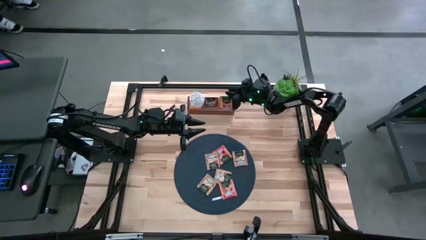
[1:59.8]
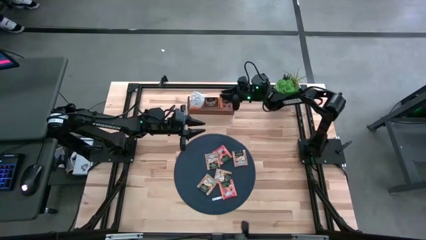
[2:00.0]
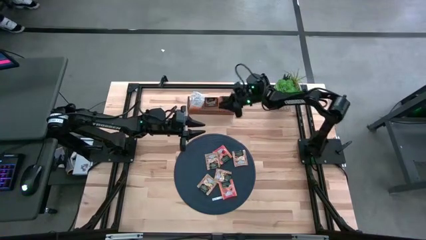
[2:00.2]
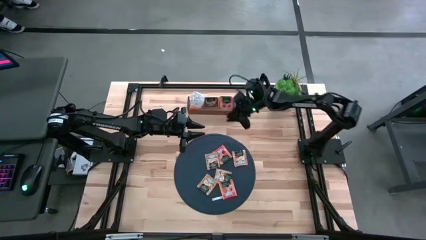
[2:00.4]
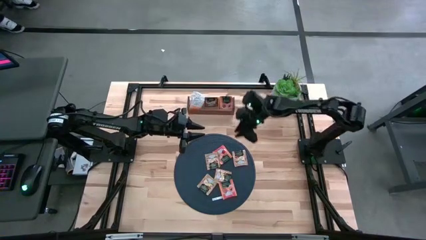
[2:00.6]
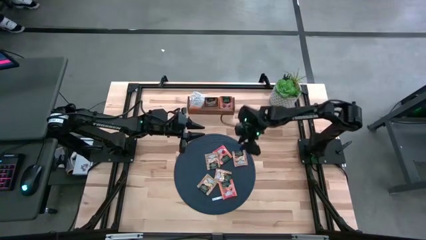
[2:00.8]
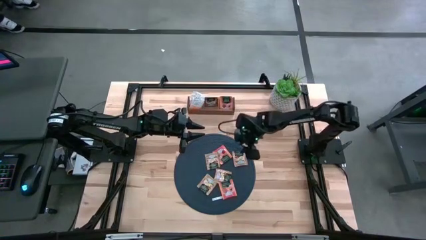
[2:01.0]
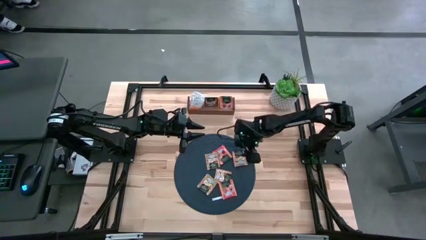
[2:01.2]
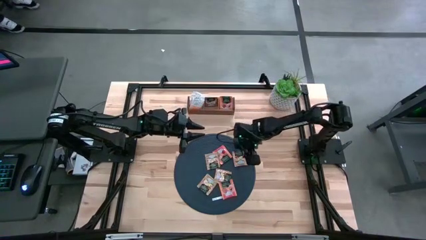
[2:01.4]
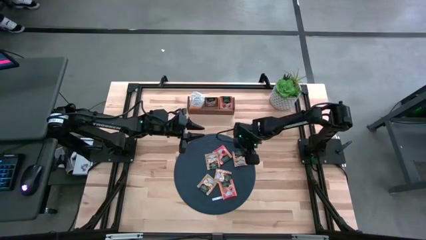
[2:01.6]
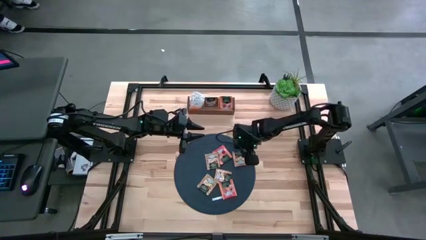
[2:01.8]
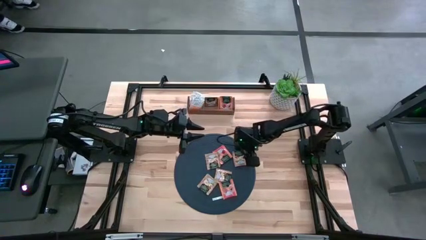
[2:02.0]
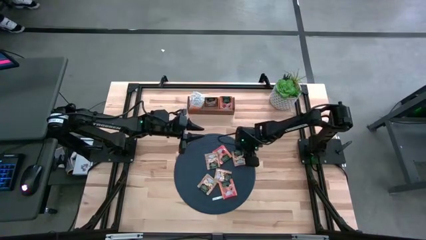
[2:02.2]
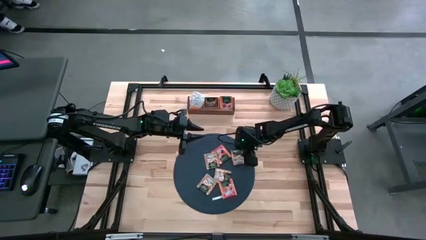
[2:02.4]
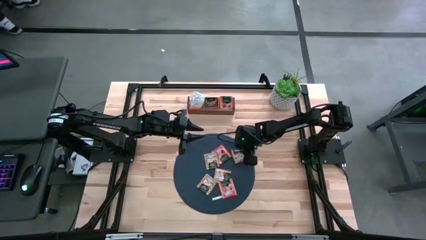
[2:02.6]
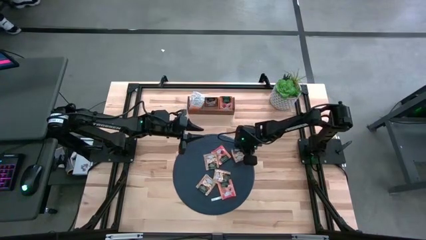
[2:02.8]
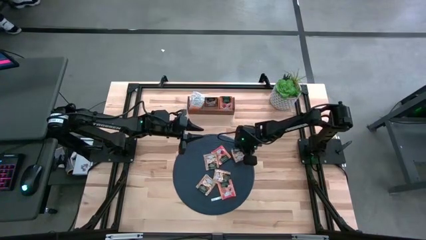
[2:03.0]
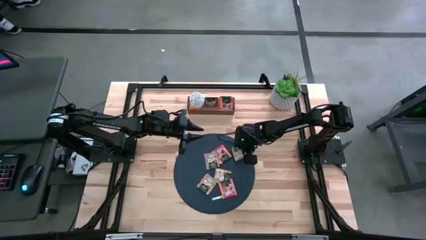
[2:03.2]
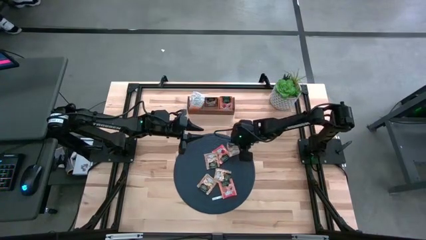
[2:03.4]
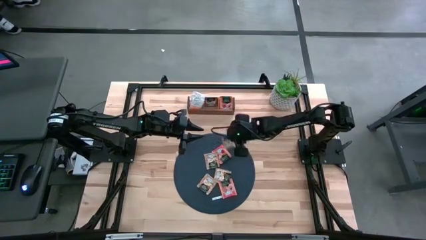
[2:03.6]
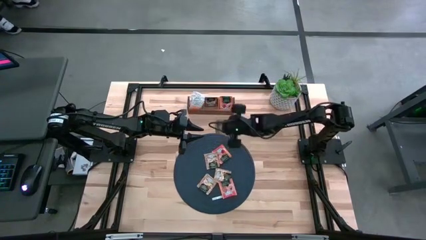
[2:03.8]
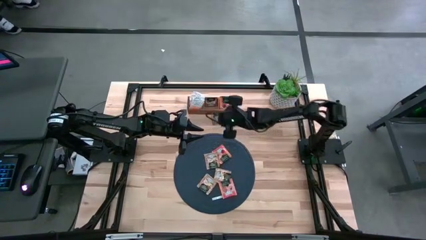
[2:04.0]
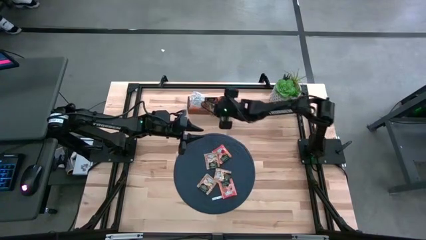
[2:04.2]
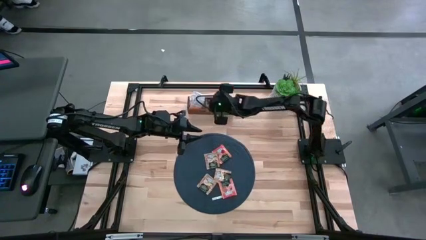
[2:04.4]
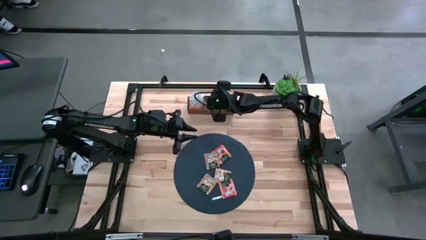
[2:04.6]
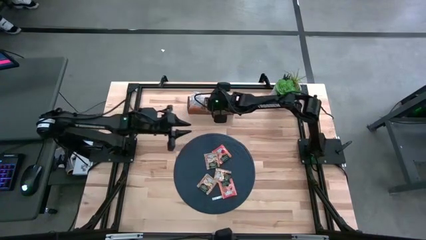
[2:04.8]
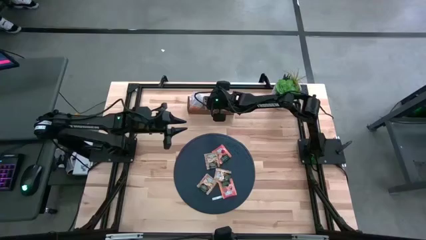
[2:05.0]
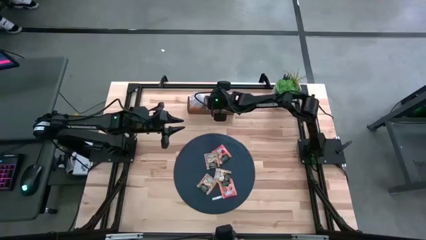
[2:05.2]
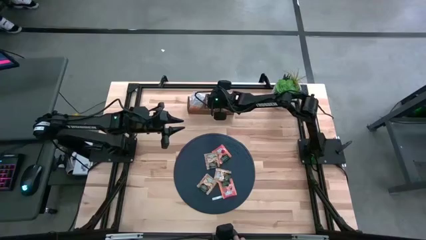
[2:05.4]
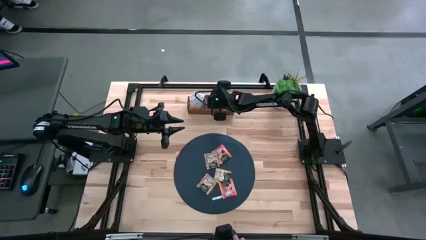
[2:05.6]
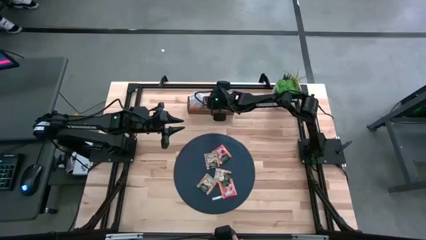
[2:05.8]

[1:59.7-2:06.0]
Task: Pick & Place Tea
Put the brown tea bag into the middle section of the wooden organizer

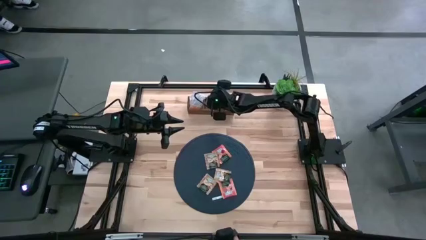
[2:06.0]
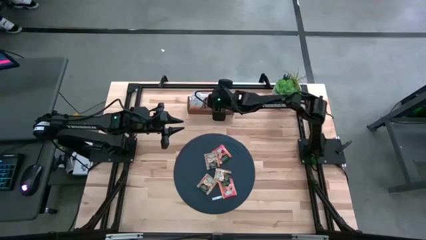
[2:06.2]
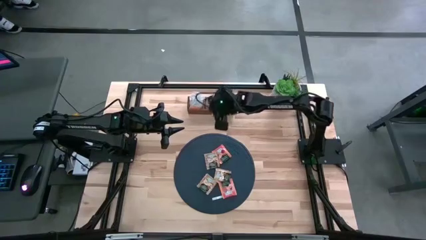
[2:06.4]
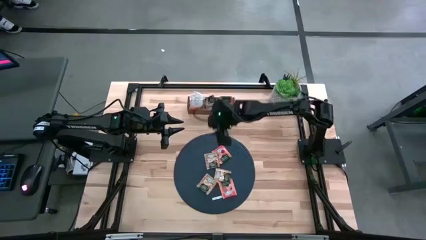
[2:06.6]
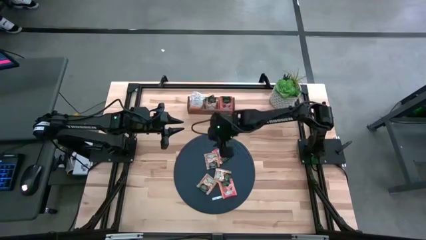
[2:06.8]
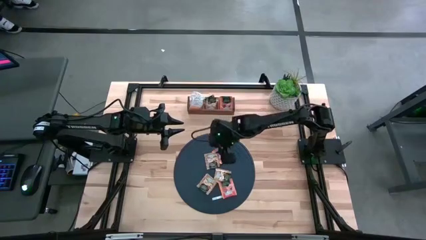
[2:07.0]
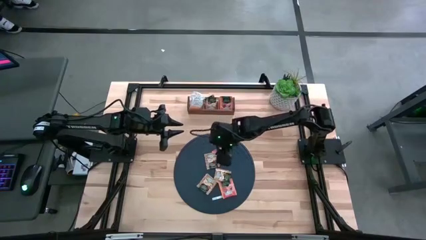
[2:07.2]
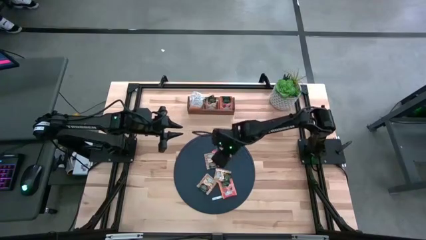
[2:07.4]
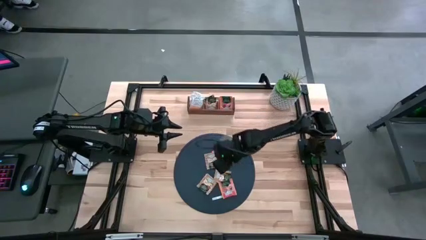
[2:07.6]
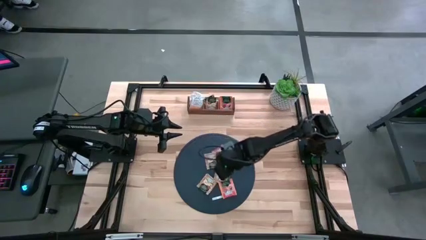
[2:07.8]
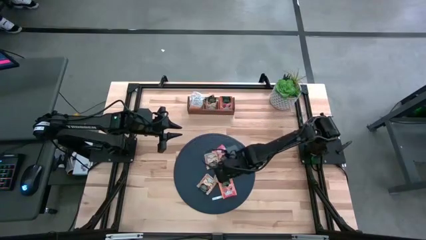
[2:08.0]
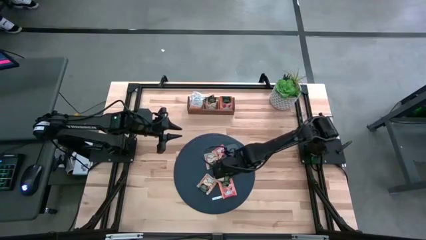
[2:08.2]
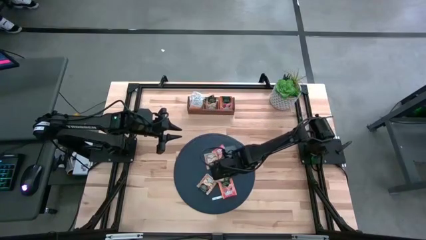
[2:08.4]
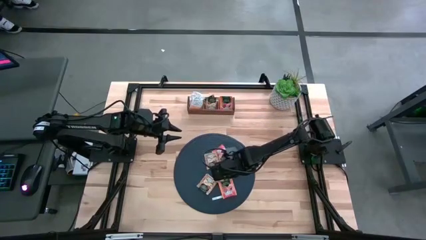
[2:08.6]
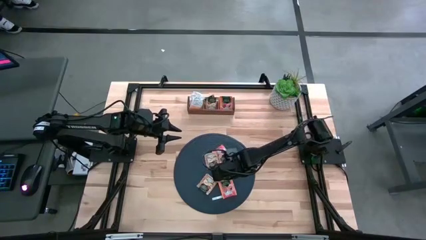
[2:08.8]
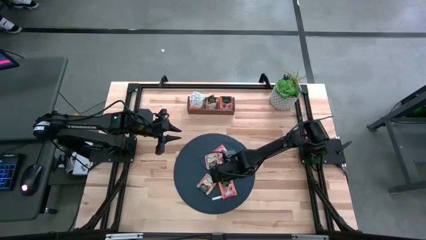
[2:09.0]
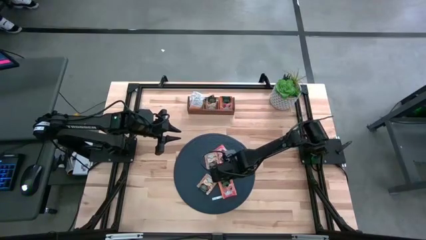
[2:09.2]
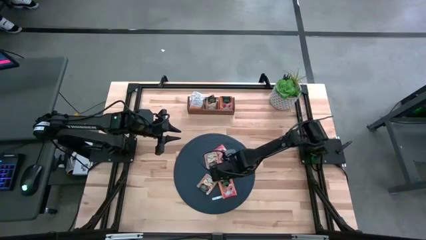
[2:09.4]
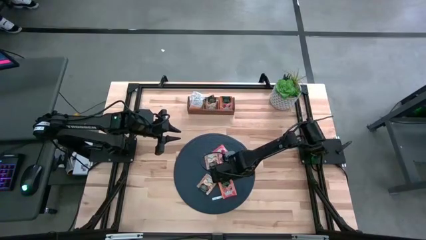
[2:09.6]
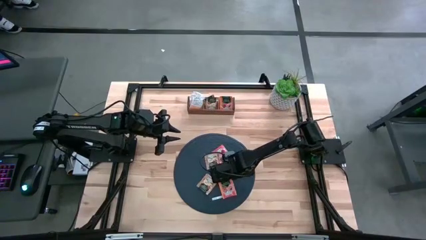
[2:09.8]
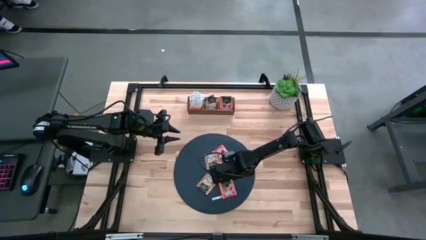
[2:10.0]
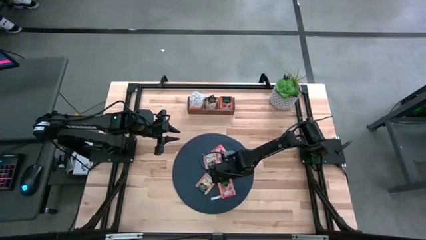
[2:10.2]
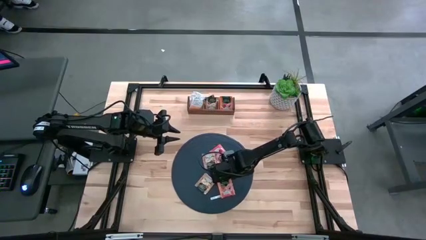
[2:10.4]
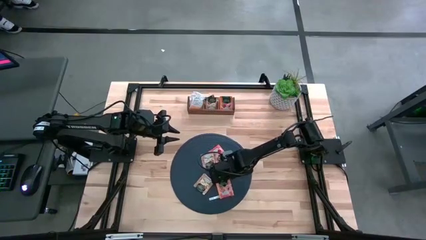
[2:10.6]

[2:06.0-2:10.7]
Put the brown tea bag into the middle section of the wooden organizer

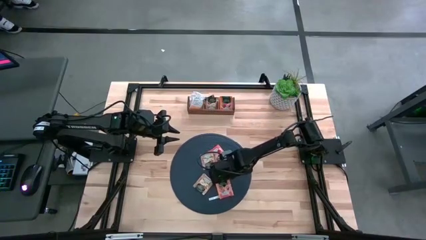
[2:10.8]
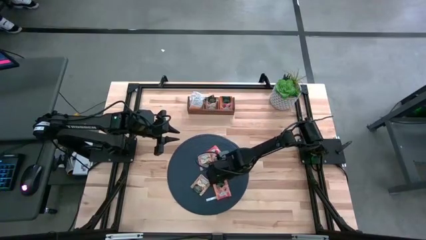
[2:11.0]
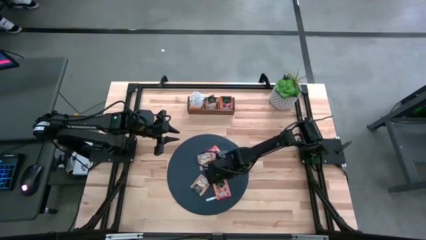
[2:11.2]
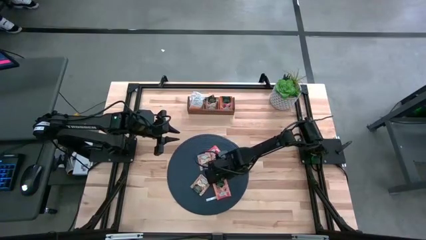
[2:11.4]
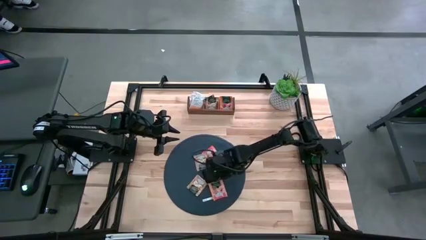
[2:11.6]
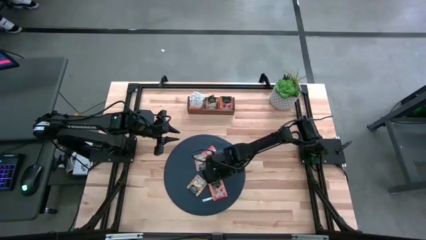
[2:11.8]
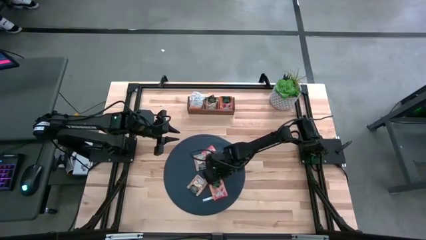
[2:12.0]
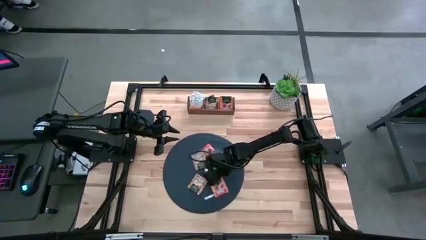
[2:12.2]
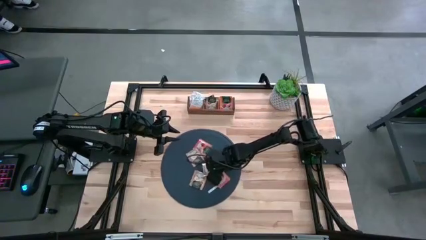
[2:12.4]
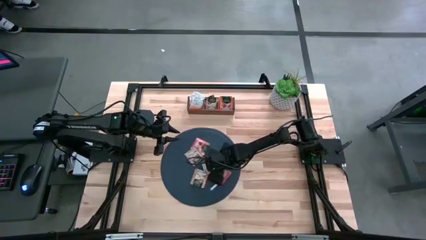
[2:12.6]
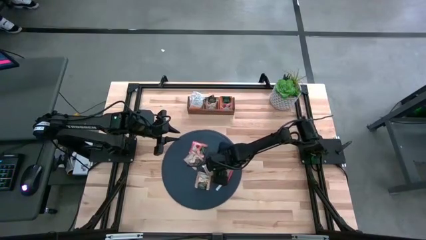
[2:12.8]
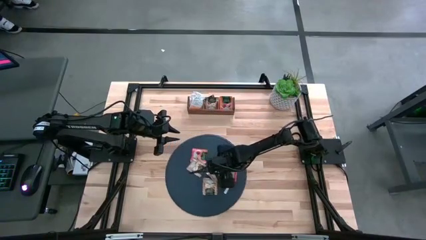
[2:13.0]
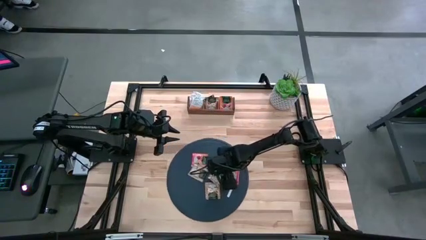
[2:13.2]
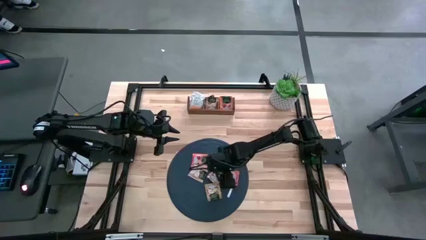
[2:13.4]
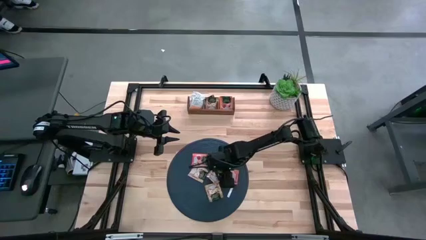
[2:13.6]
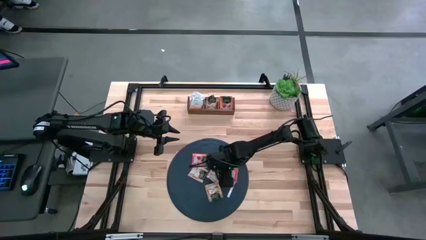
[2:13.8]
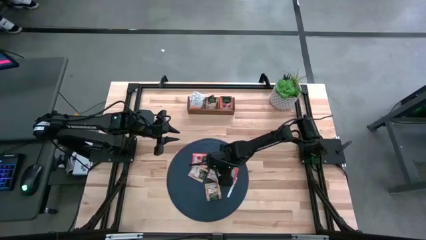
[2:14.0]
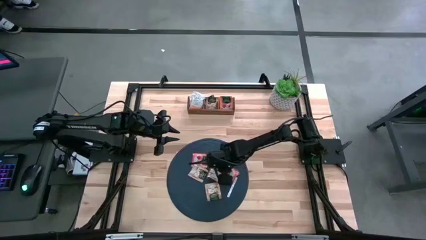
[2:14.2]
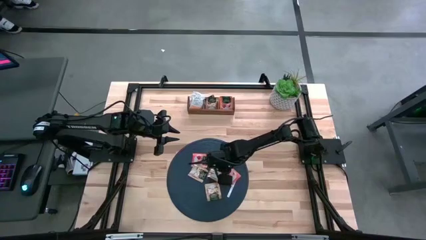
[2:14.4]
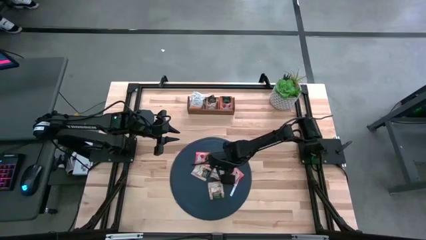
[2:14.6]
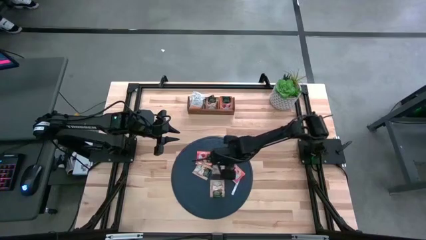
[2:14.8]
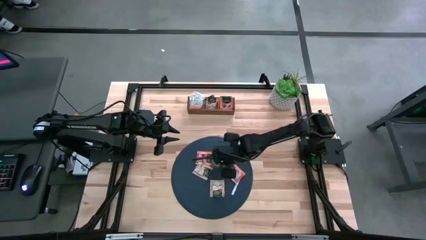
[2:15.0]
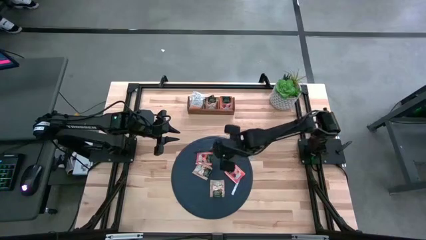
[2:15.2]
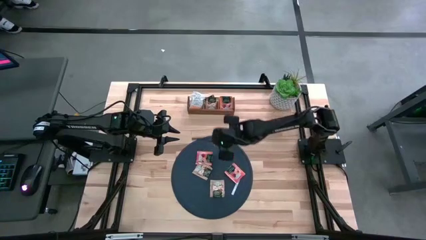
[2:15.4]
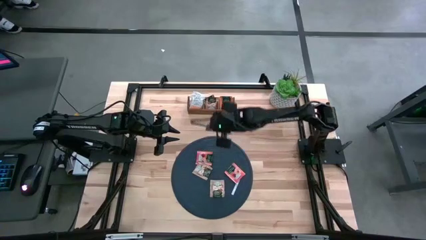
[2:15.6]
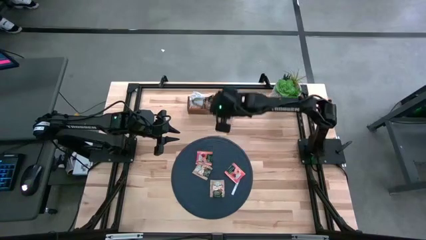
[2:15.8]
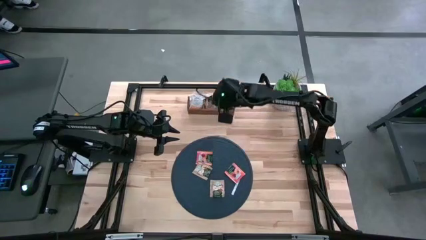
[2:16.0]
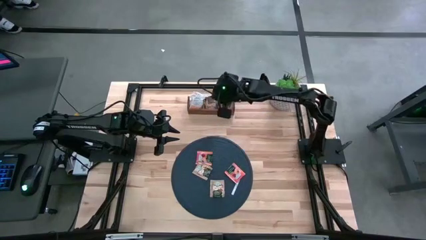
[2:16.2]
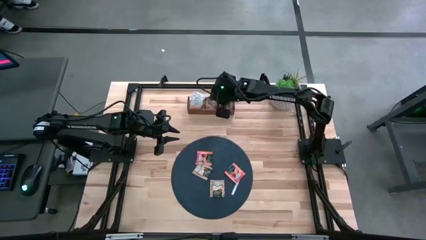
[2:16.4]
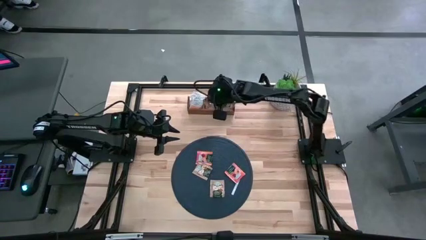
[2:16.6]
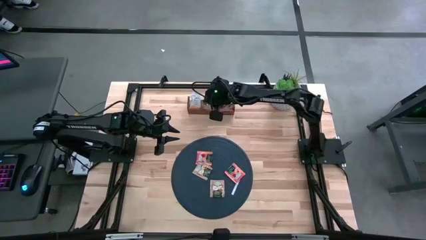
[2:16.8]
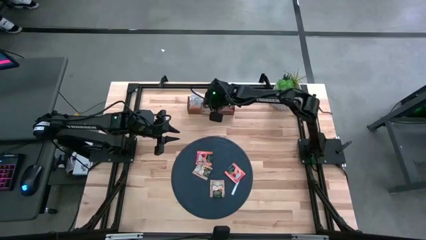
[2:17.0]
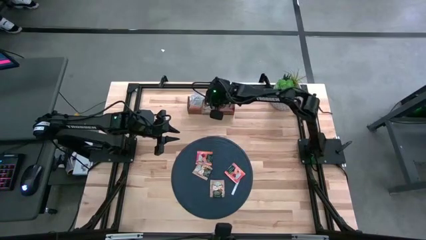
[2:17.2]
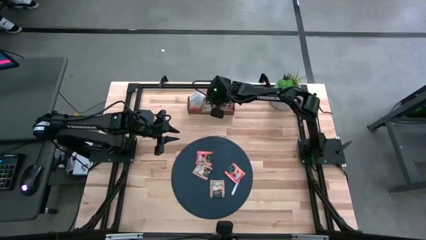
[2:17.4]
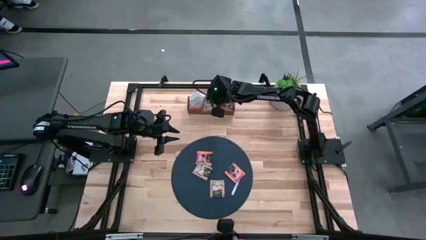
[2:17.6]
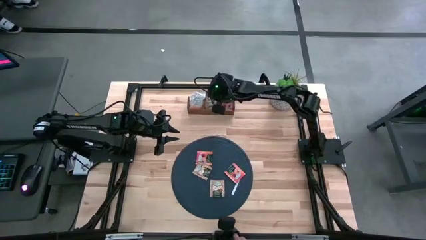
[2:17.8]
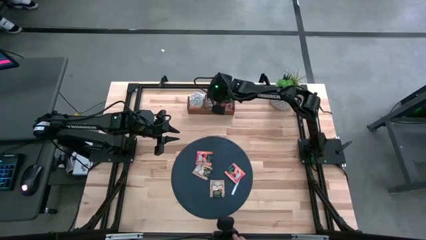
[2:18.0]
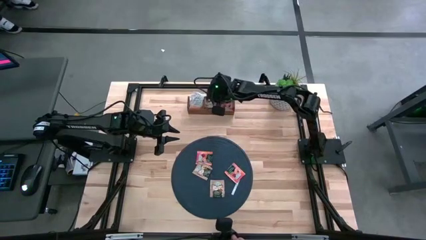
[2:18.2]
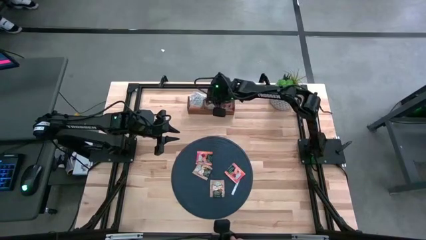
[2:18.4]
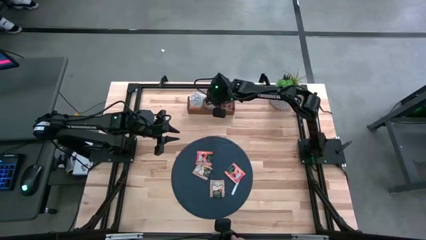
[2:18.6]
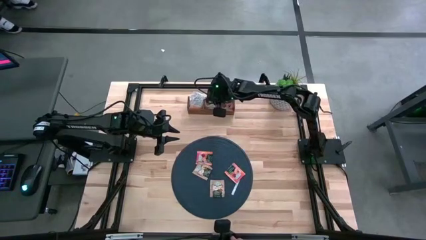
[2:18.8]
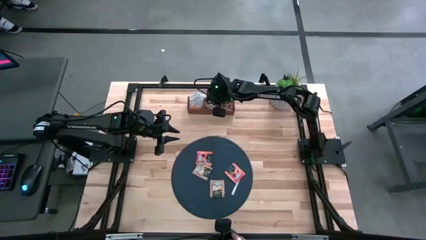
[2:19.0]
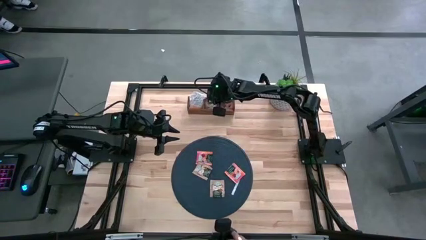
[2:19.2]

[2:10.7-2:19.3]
Put the brown tea bag into the middle section of the wooden organizer
